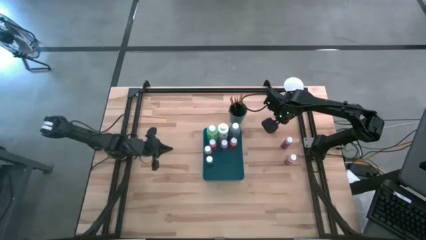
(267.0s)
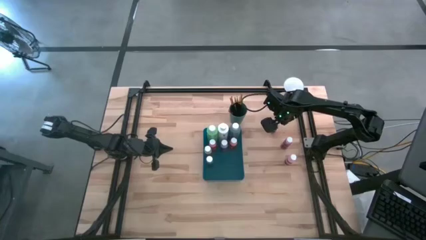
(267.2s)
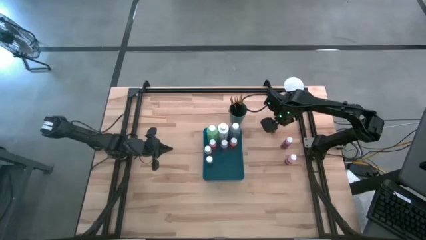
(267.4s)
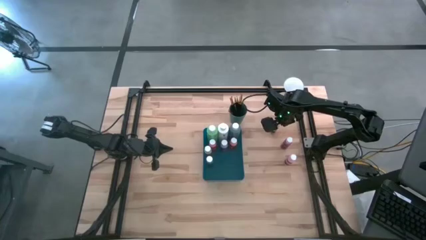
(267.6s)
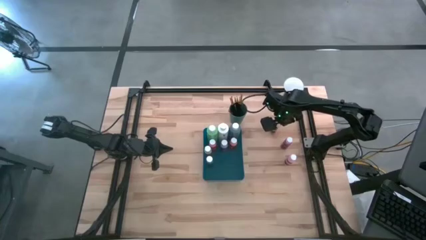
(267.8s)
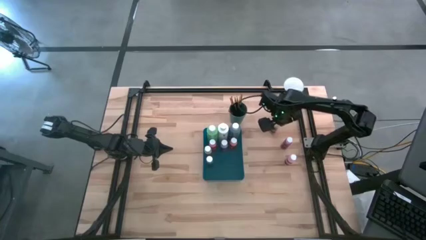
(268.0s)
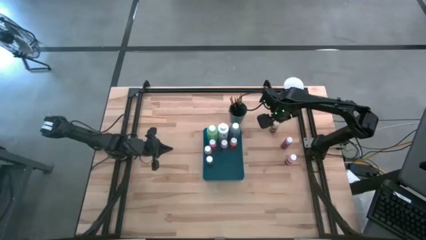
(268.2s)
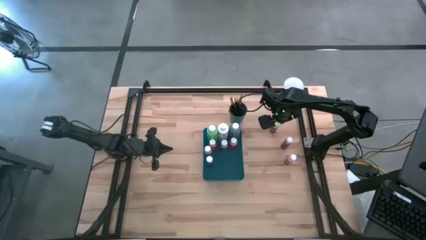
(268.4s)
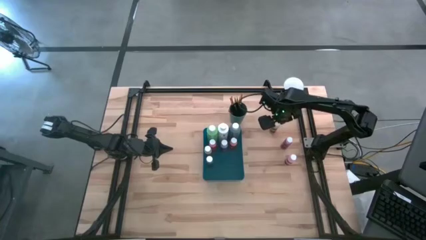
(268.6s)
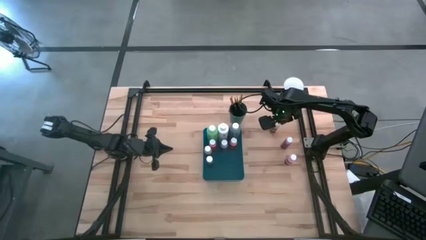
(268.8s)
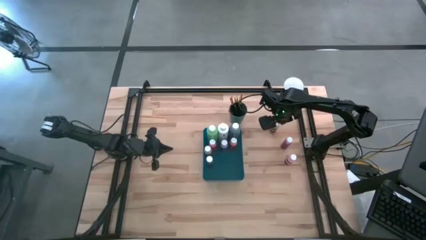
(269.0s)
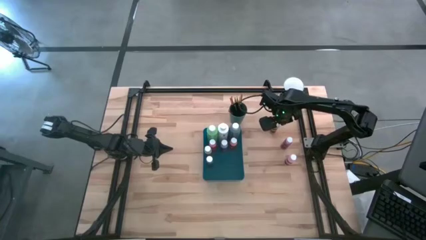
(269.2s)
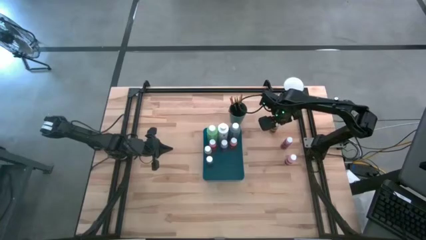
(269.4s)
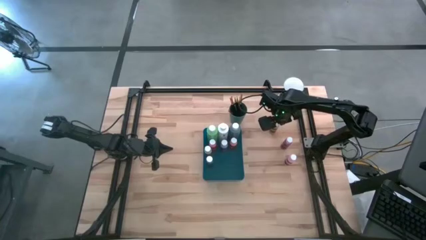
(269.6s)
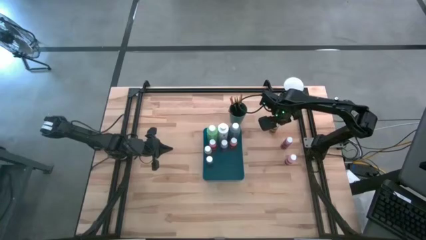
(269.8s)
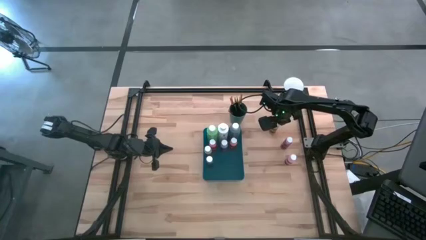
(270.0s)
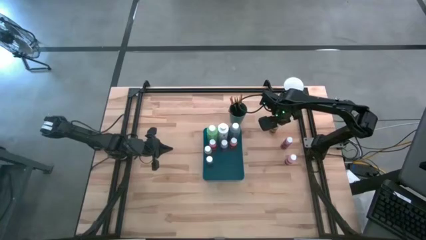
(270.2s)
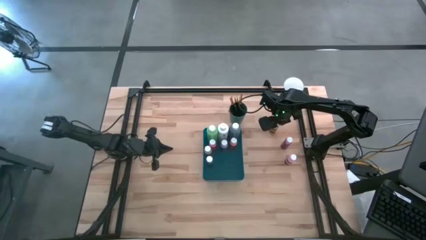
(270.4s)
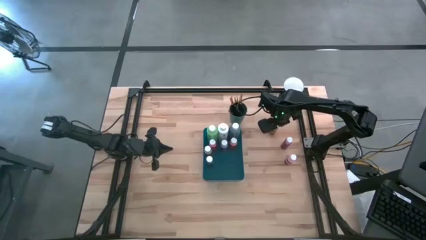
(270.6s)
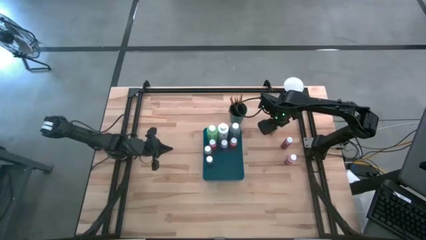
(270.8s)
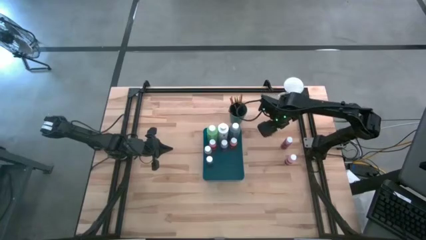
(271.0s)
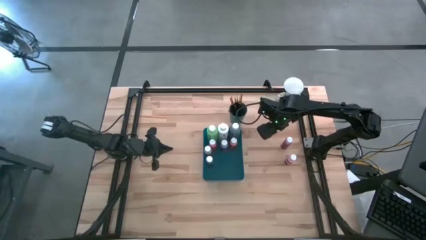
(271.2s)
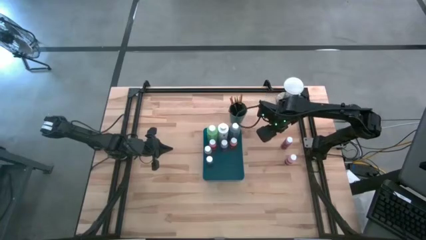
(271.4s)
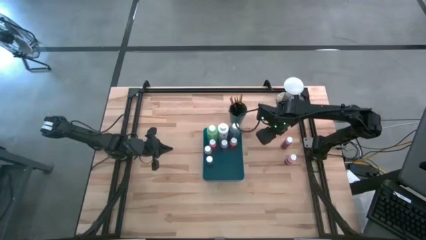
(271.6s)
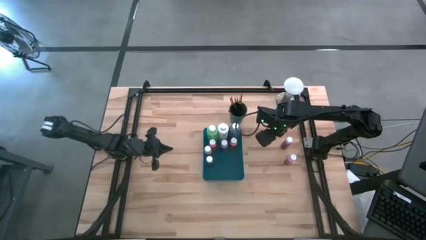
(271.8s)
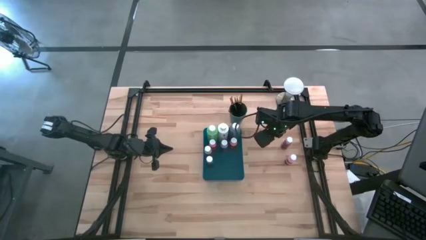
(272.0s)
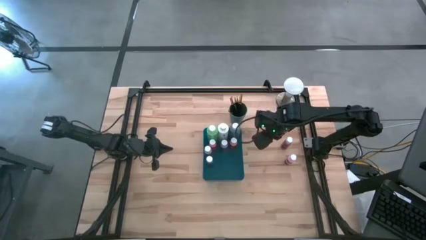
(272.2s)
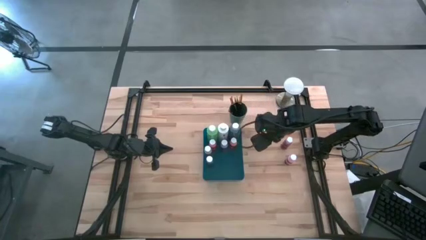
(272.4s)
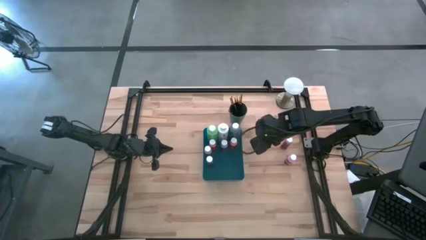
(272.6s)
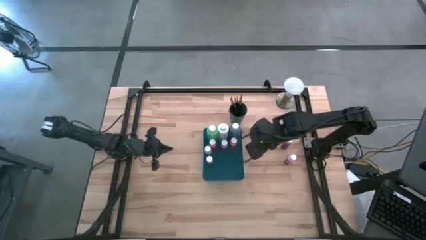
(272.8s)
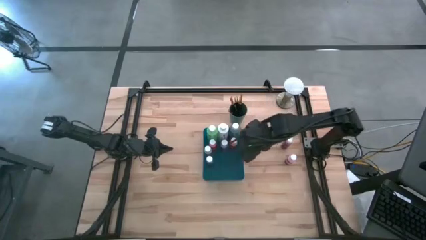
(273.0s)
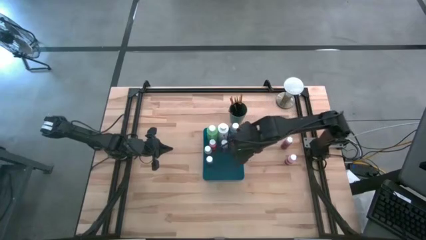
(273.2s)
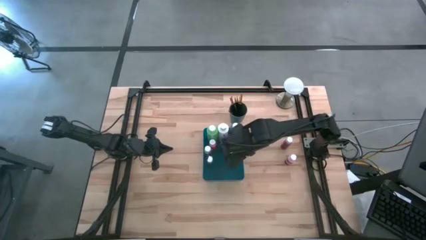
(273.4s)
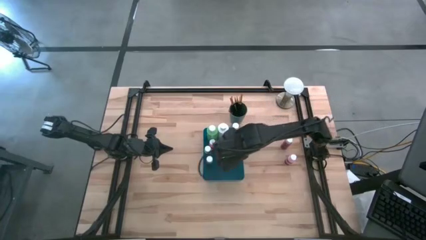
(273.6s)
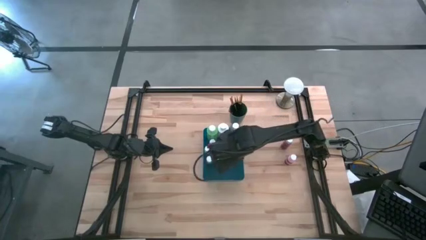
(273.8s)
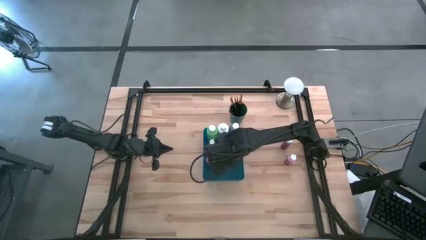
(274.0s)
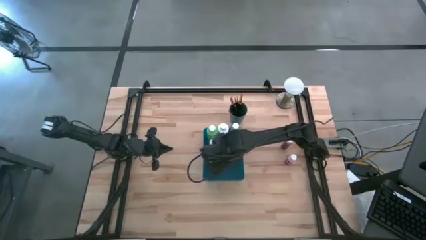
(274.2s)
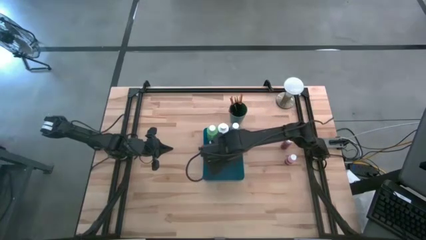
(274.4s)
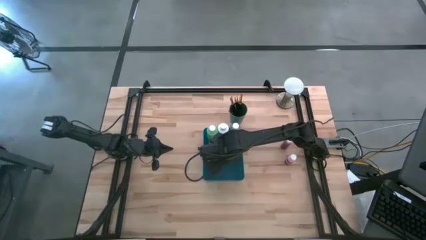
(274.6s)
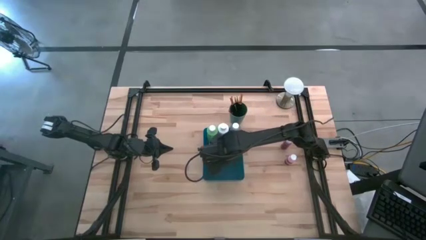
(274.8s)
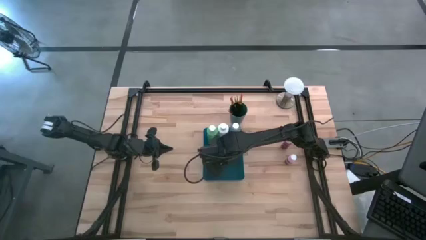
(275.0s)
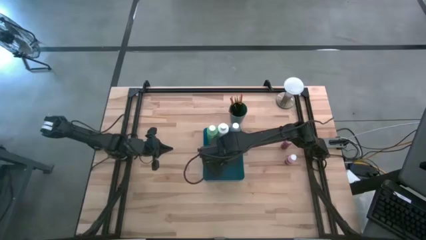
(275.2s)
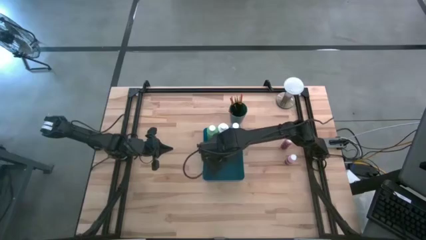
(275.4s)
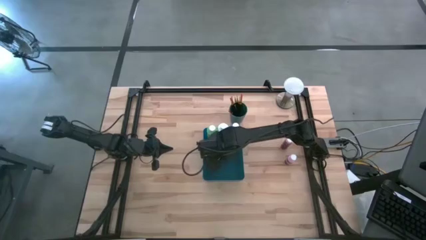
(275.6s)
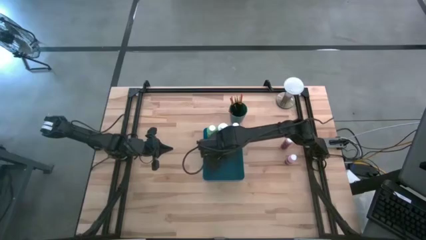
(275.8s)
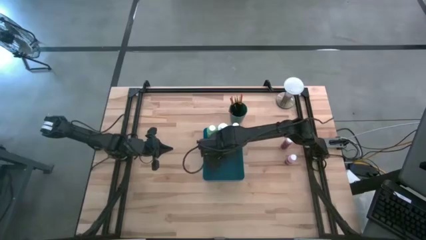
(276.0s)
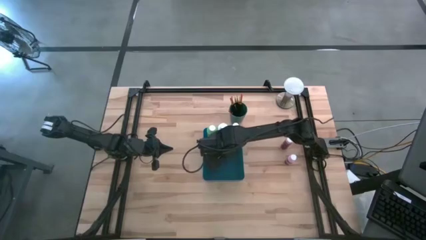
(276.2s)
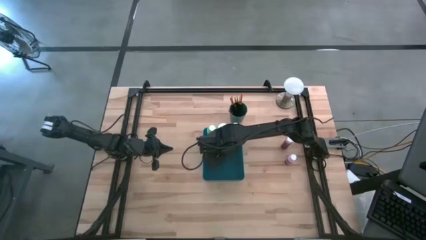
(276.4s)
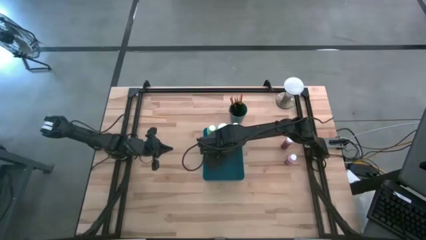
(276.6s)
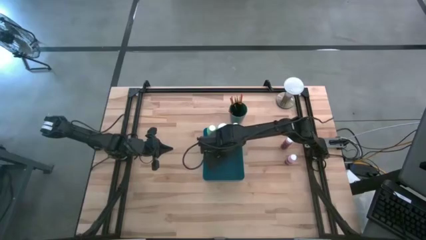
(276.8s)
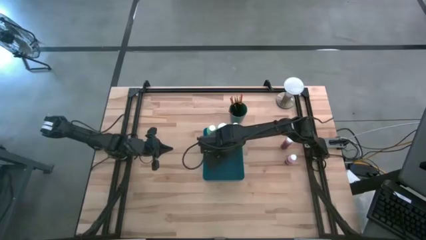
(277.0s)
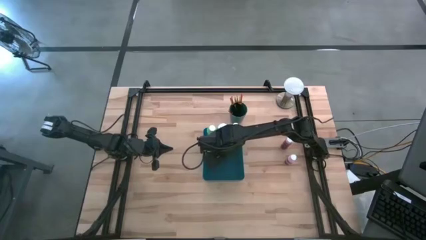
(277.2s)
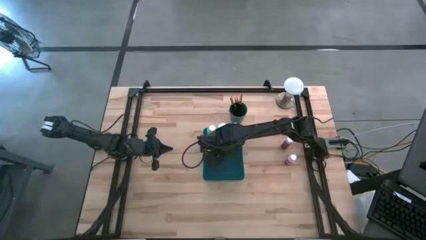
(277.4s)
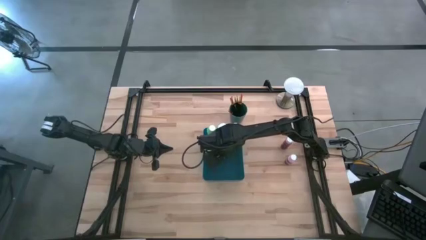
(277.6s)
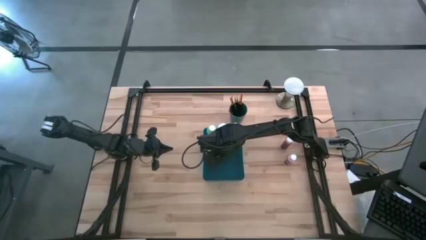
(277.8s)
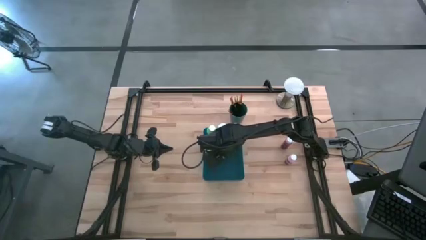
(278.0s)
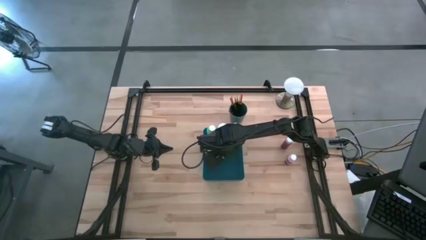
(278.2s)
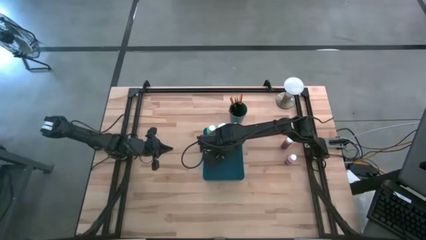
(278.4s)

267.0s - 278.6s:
Task: Pick & Place Paint Supplies
Put the small yellow paint bottle into the blue bin

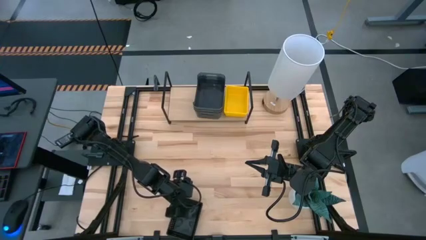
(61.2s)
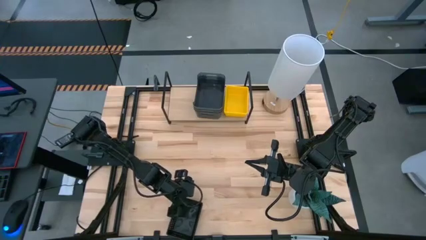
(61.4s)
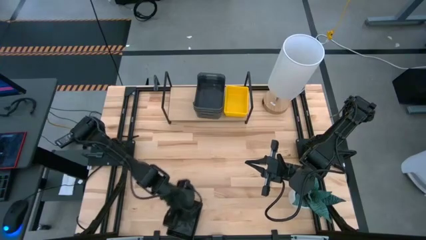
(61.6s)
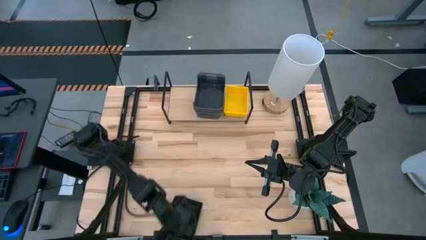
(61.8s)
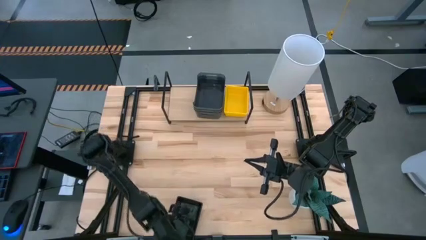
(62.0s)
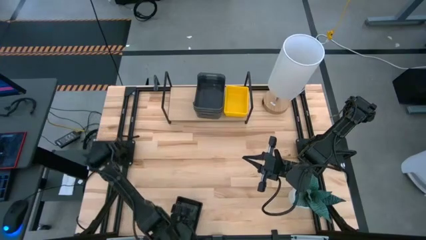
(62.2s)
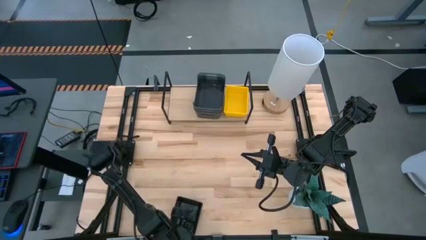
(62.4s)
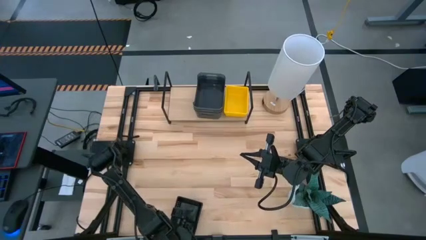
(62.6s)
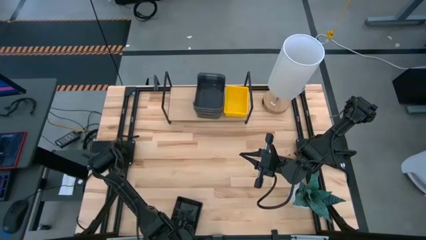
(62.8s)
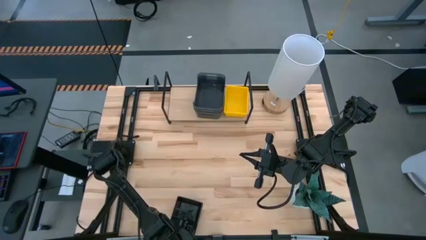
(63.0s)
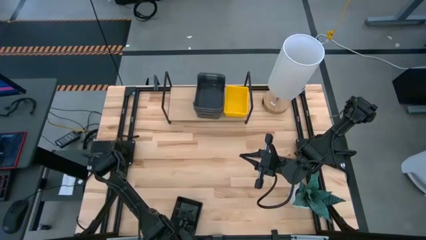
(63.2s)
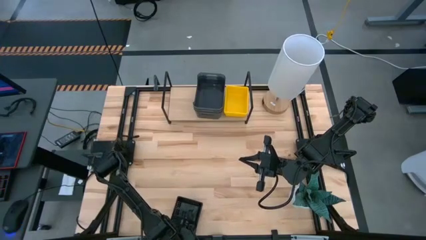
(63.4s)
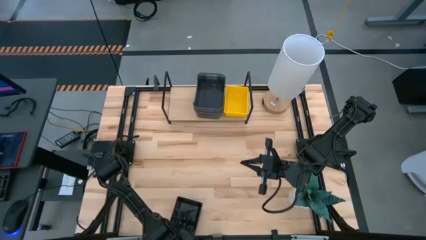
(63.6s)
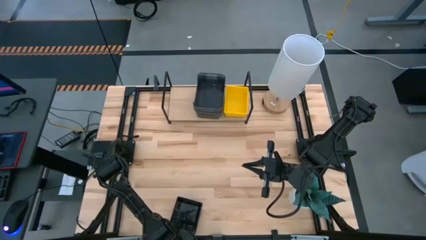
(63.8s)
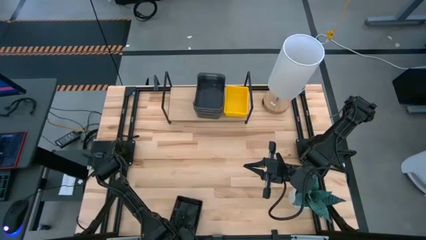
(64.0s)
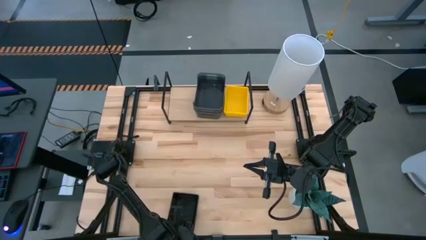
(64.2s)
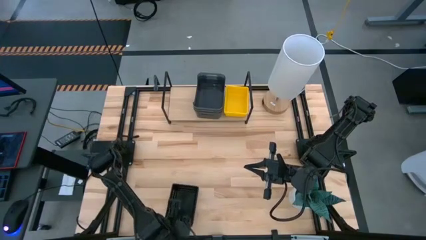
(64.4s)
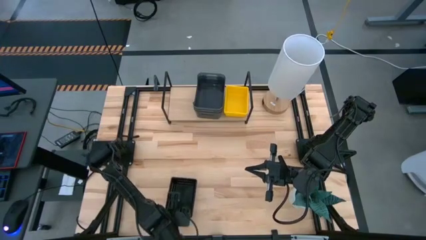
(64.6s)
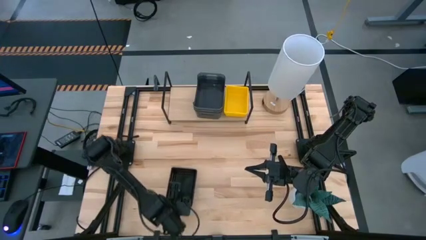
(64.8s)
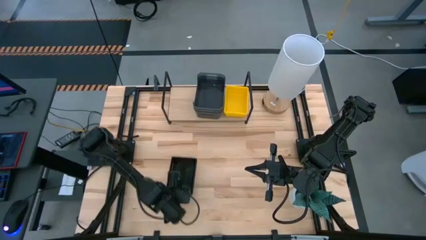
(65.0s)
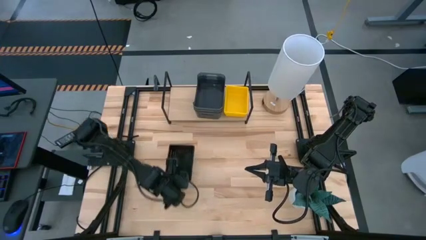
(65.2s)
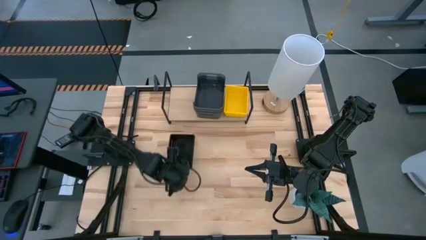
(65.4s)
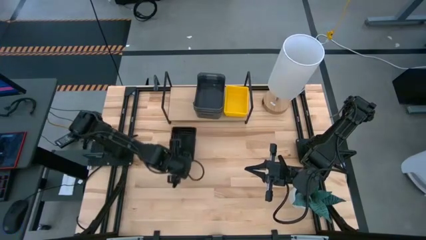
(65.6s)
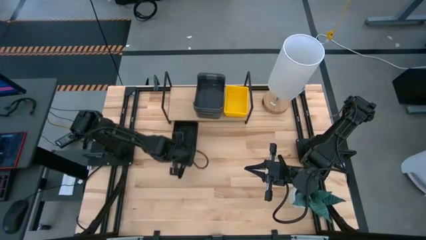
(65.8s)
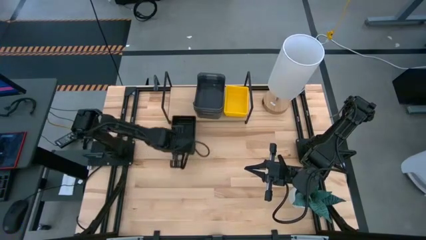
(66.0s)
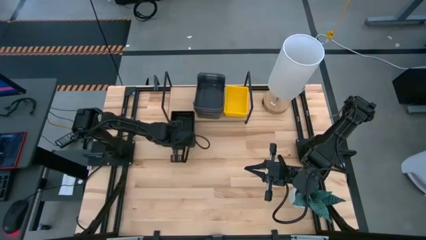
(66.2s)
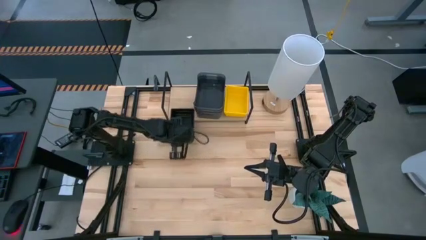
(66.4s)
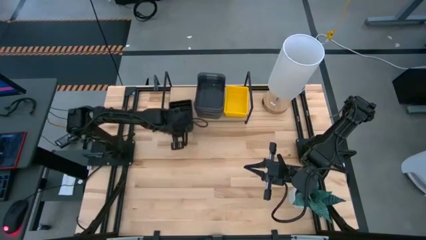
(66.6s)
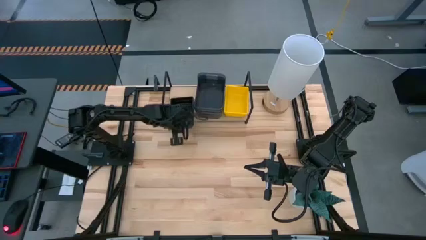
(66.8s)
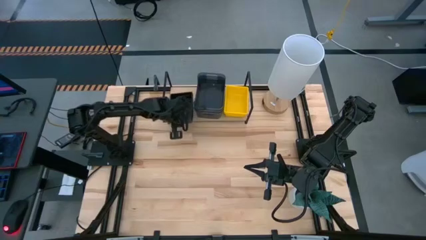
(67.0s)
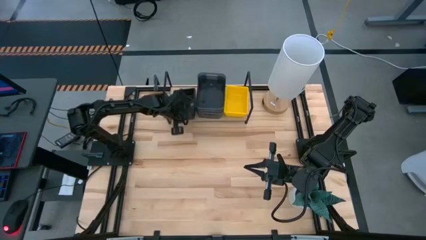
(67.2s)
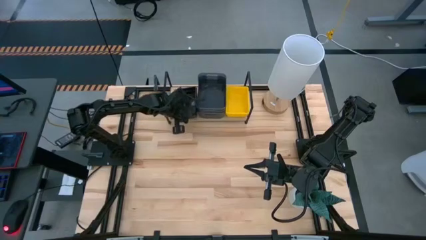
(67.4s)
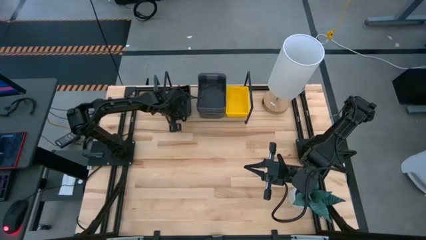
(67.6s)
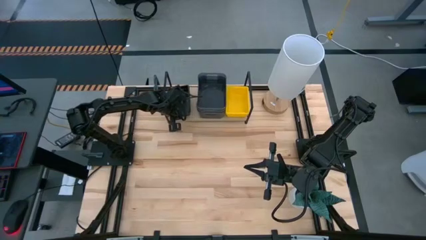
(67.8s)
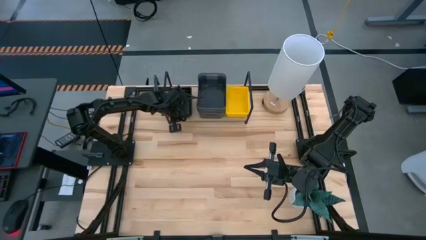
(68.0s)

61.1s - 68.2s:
Task: Stack baskets on shelf by color
Put the stacked black bins on the shelf
